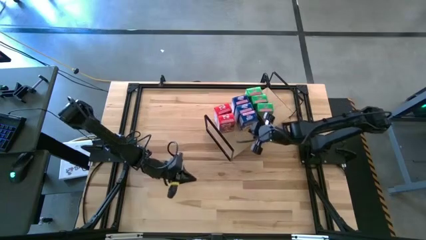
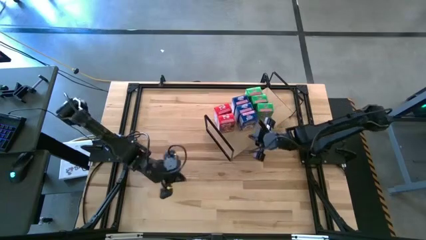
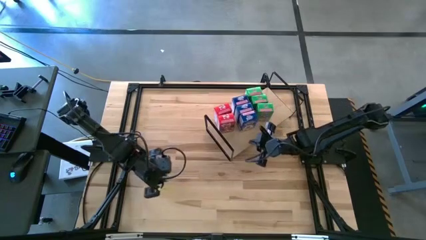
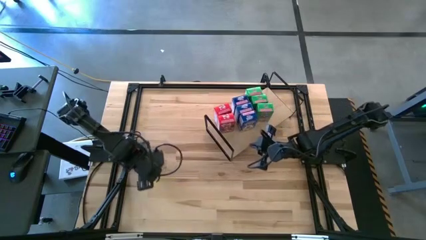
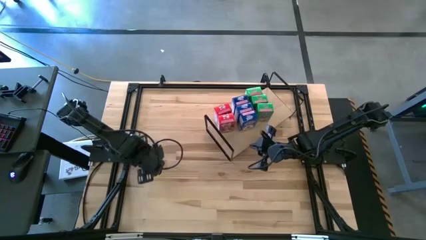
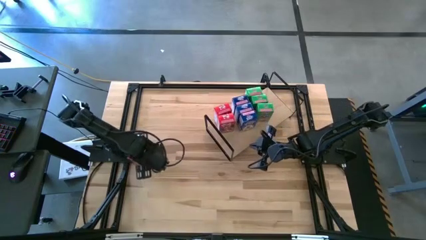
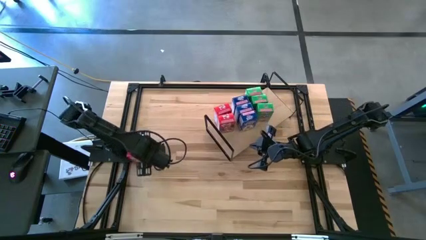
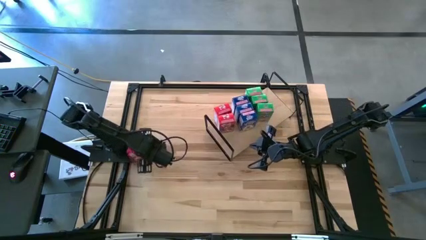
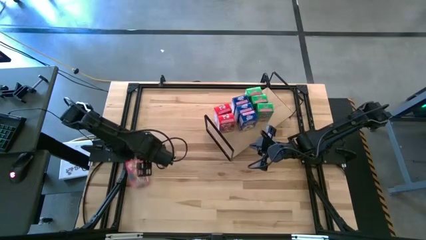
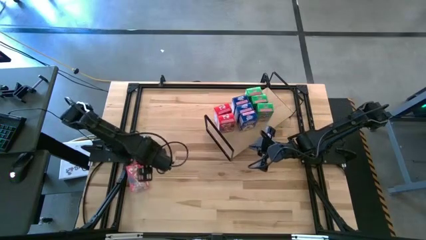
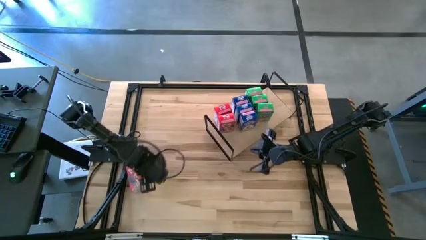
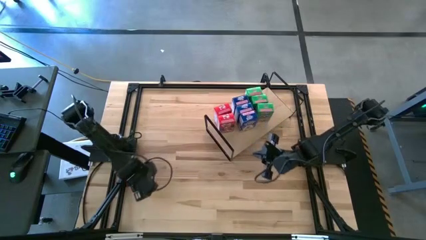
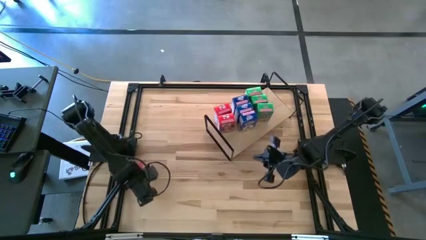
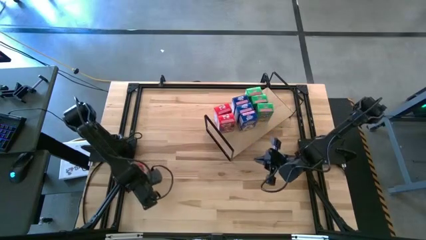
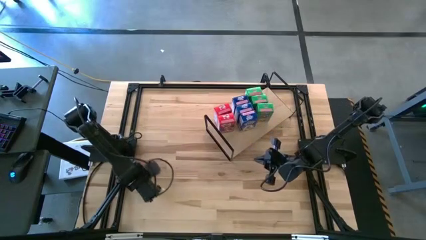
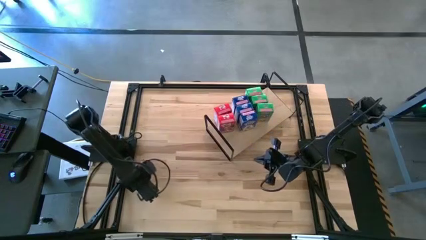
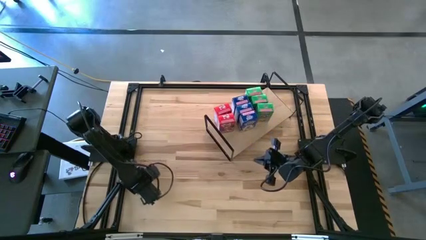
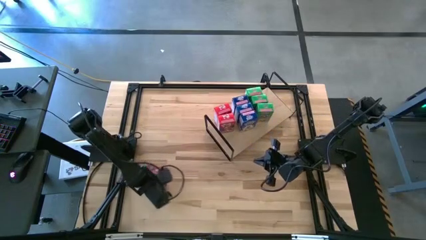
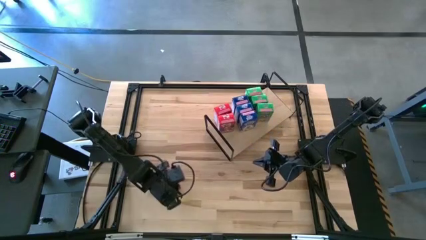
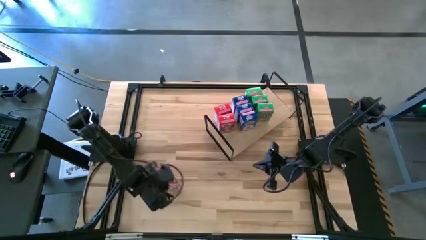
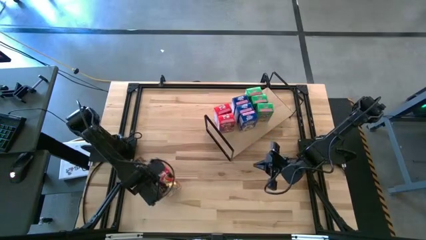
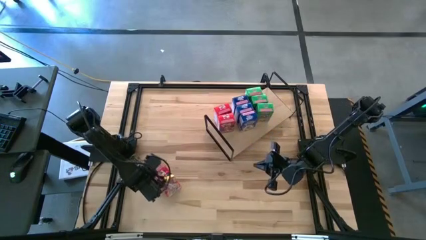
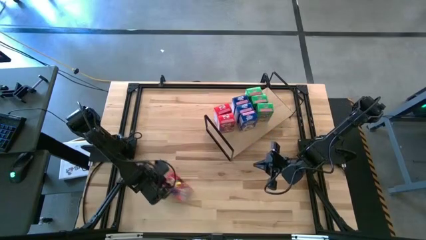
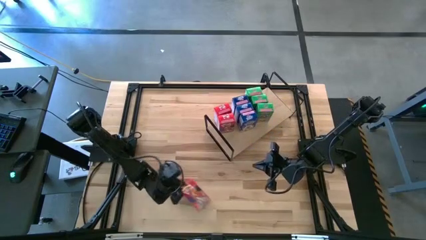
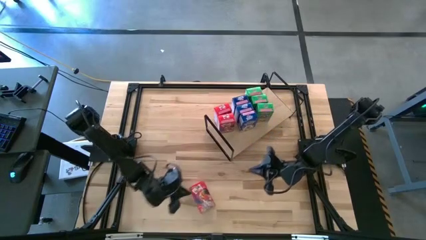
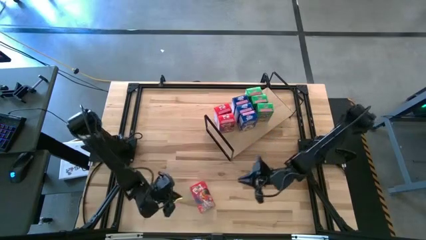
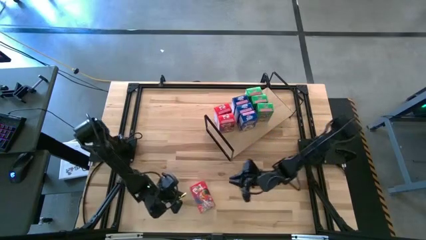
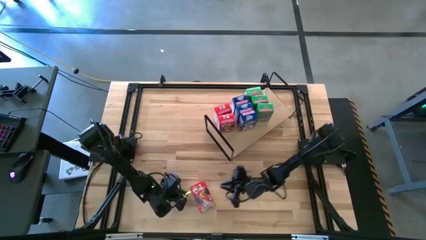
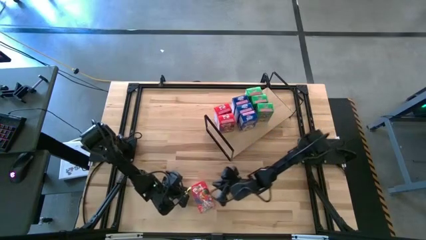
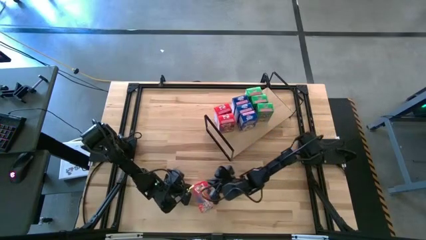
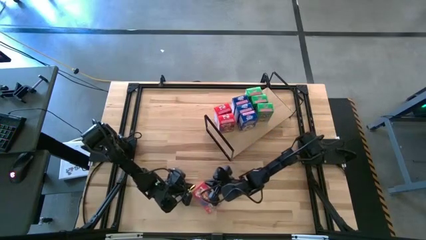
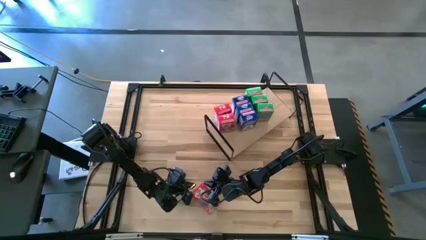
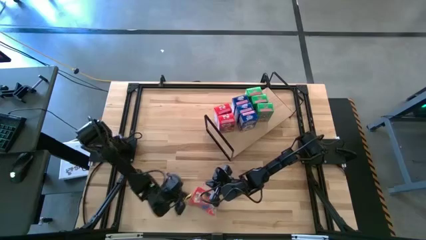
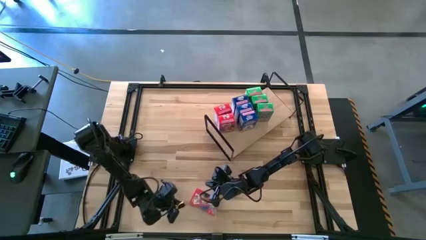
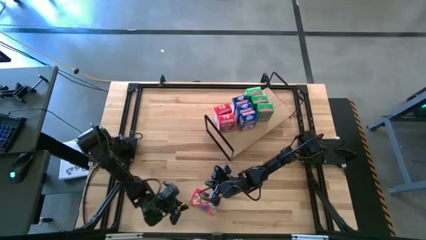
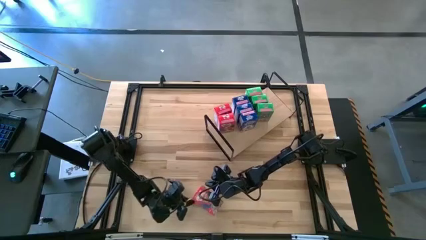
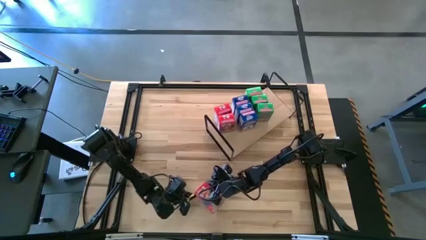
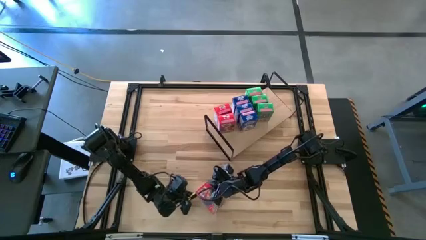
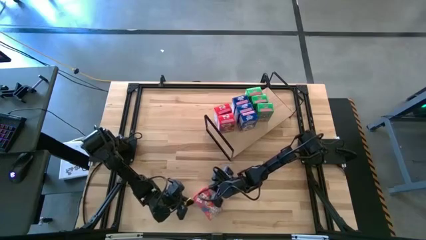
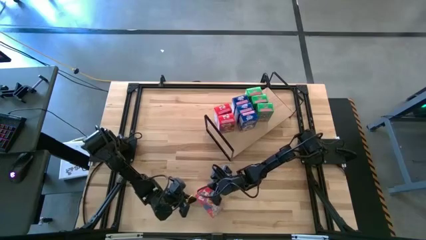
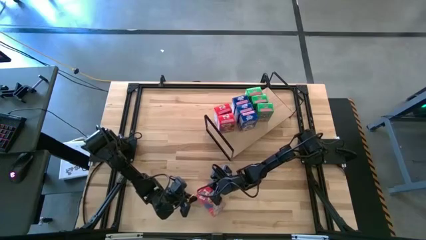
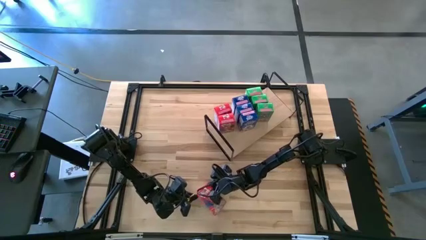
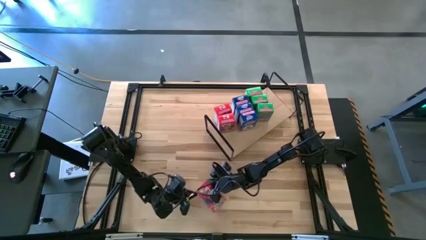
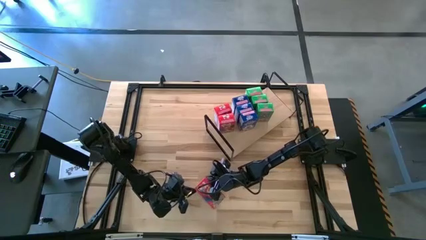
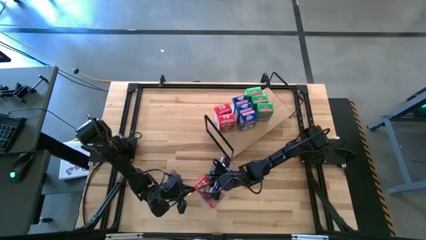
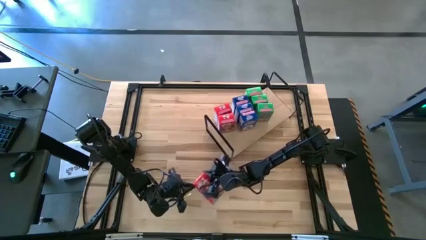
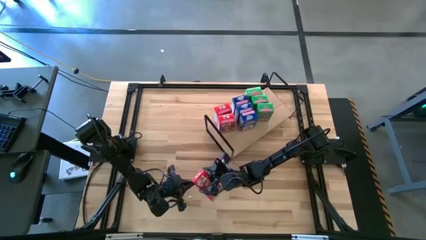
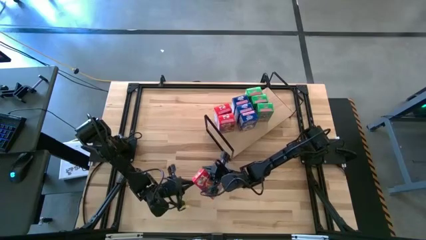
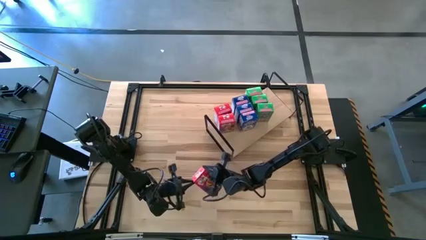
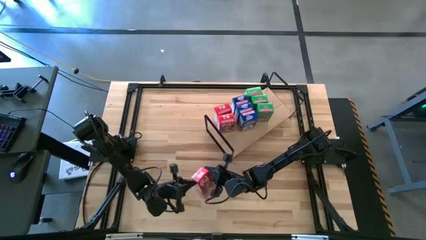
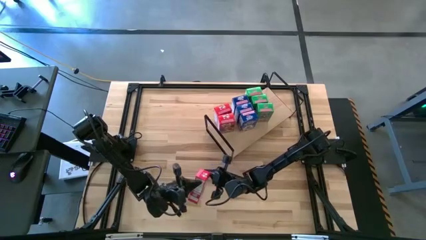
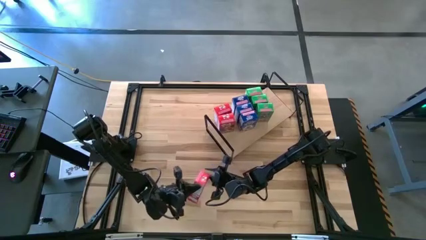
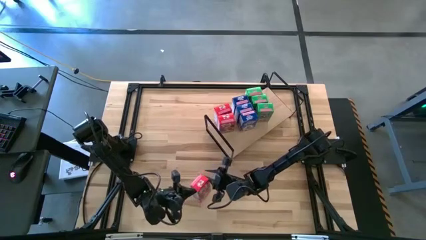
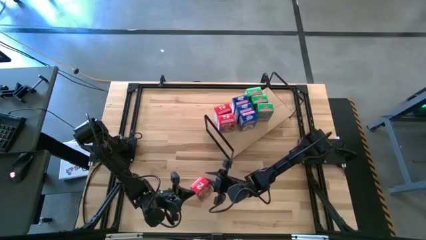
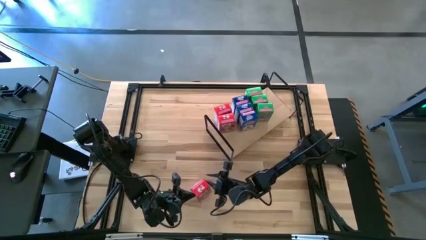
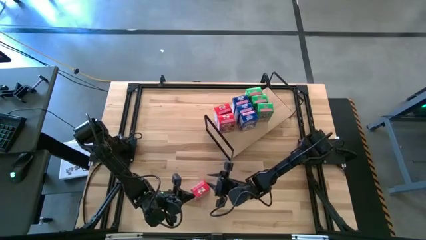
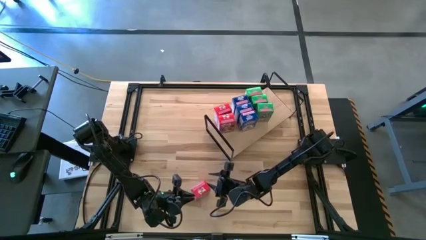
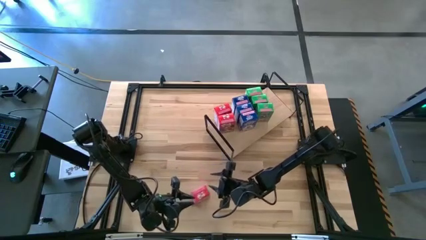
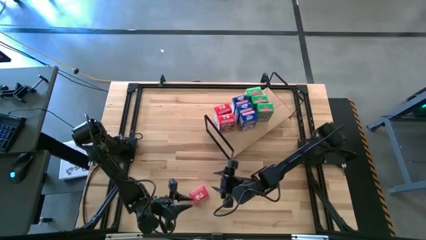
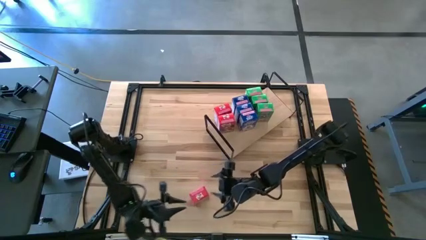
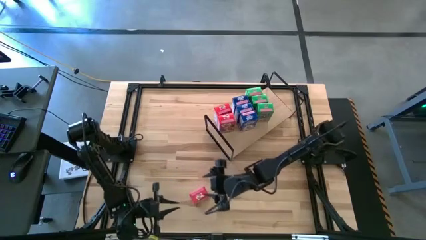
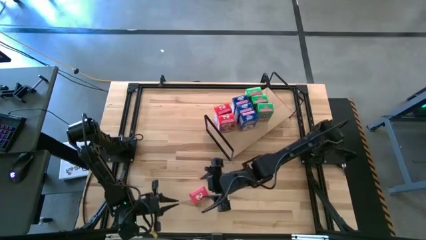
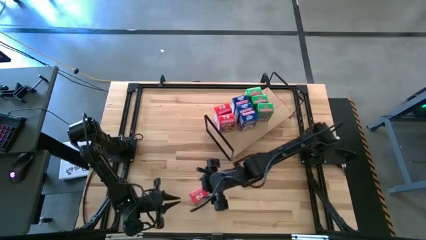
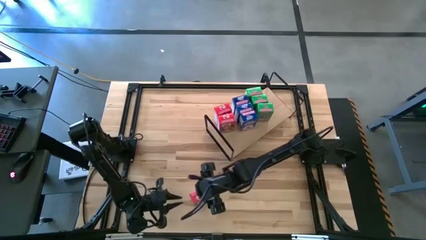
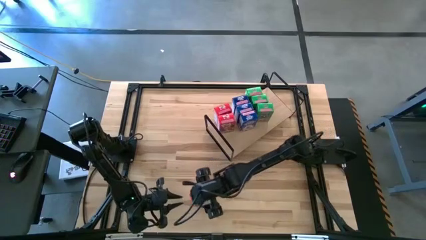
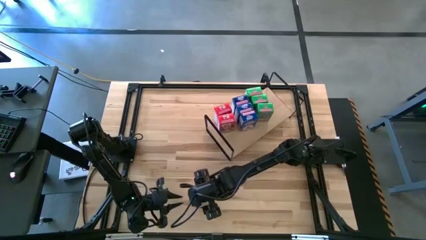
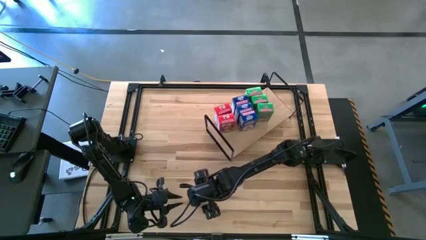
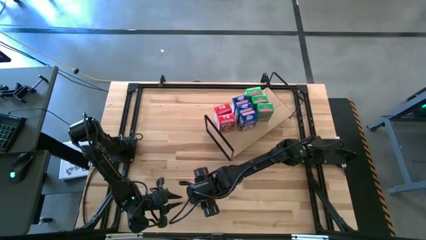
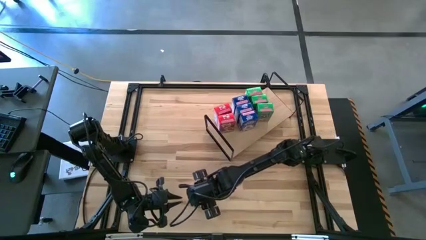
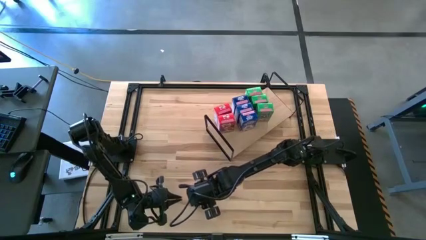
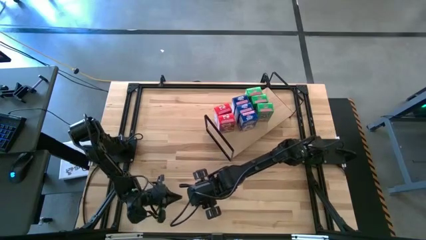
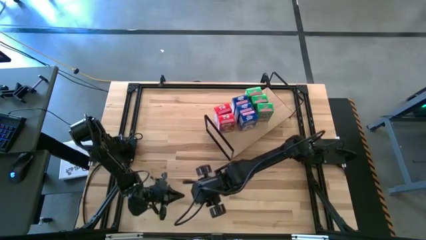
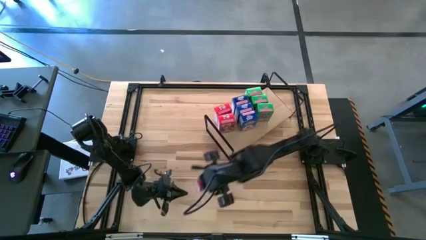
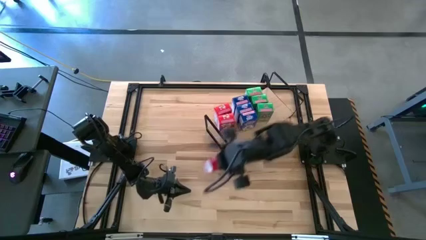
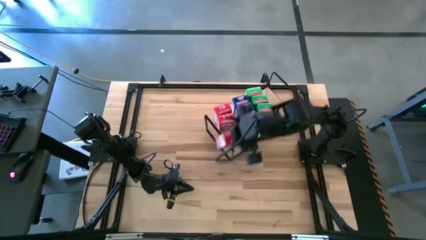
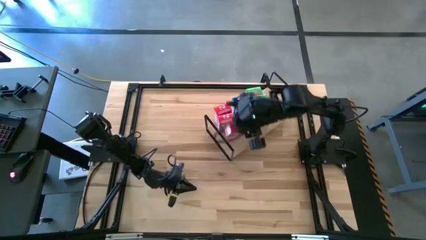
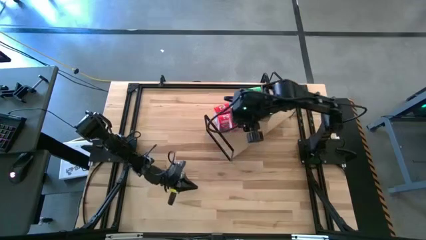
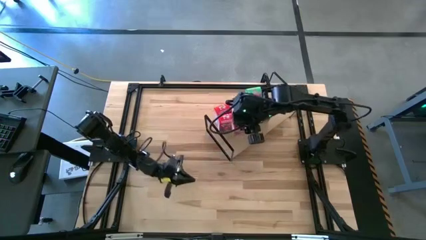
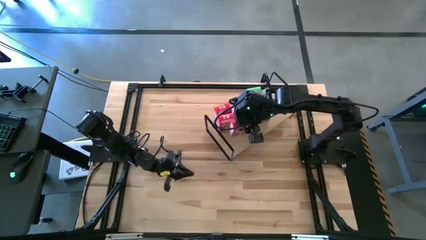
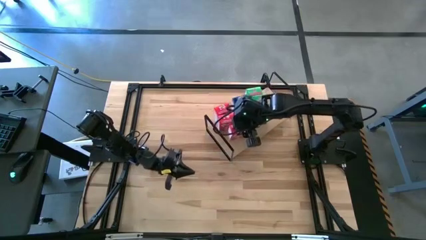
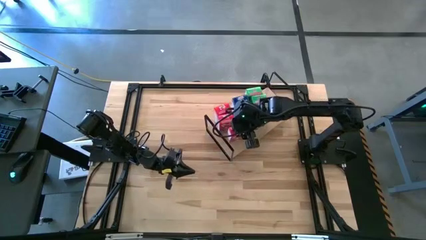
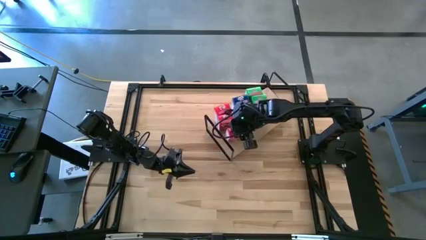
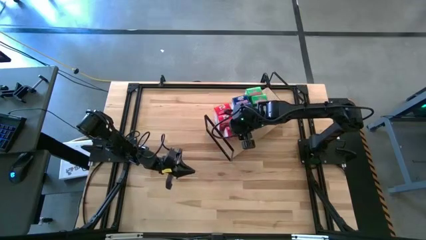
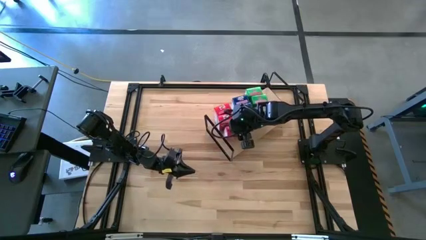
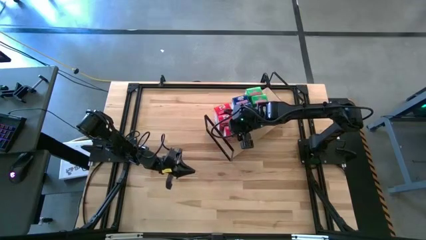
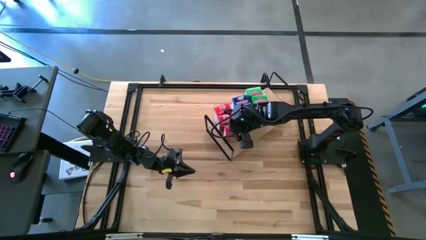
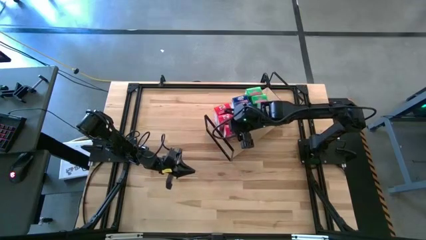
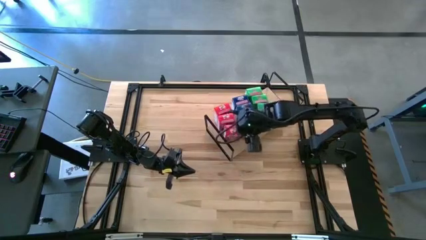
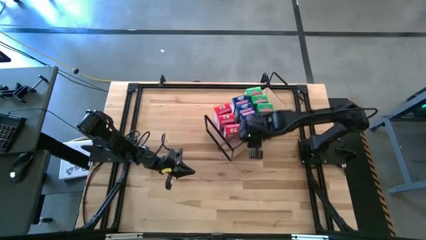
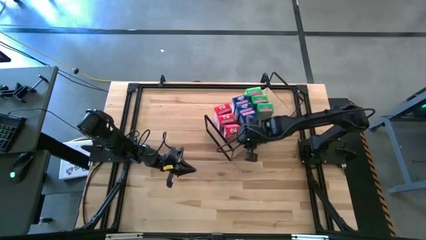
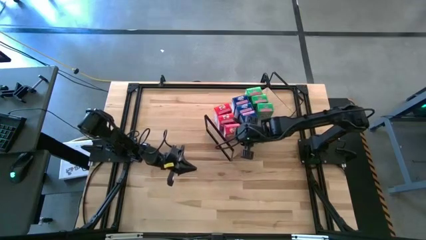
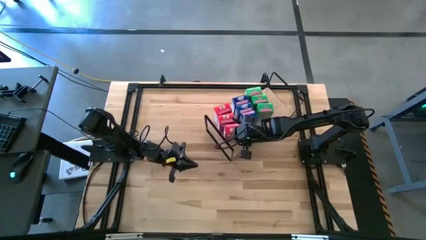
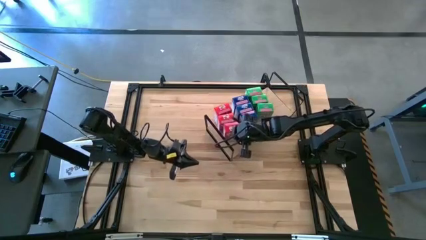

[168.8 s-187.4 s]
Task: Stack cereal on shelf
Put the red cereal box on the shelf aligned with the other red cereal boxes
